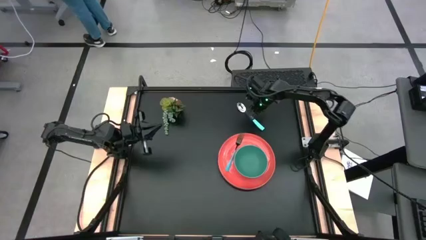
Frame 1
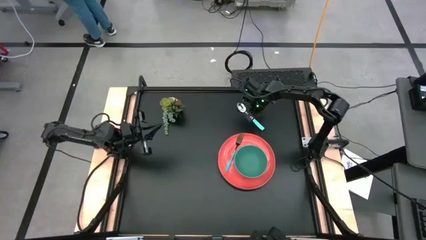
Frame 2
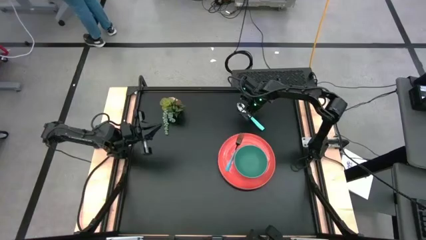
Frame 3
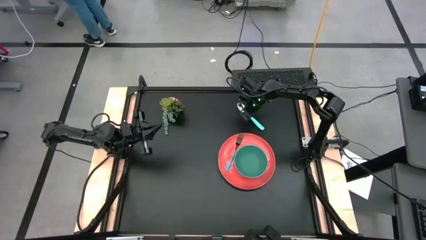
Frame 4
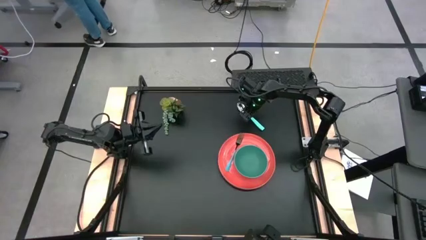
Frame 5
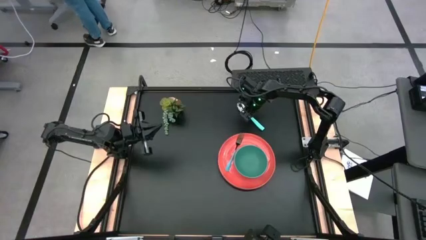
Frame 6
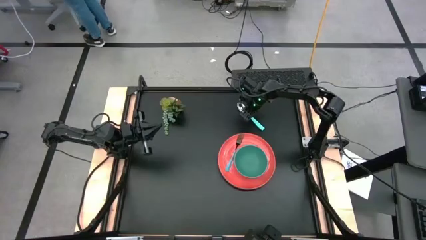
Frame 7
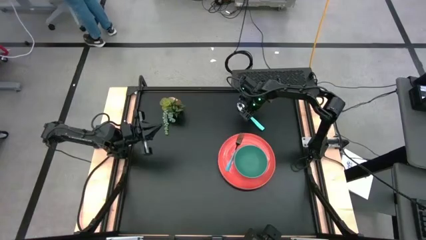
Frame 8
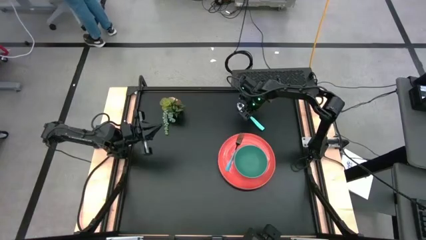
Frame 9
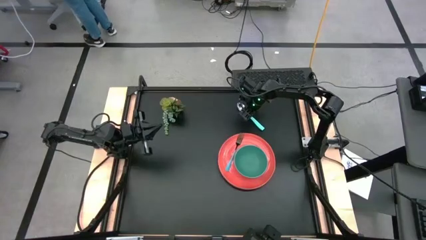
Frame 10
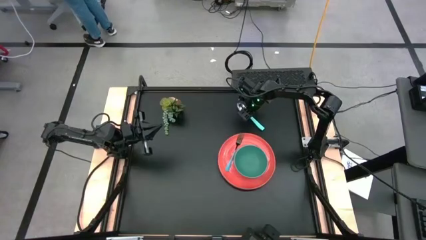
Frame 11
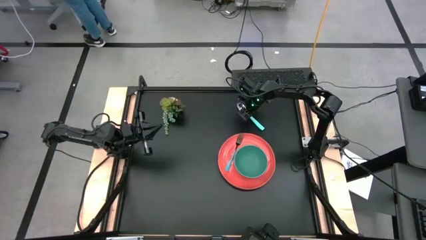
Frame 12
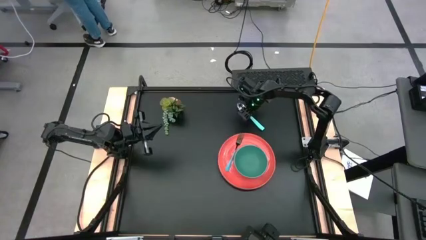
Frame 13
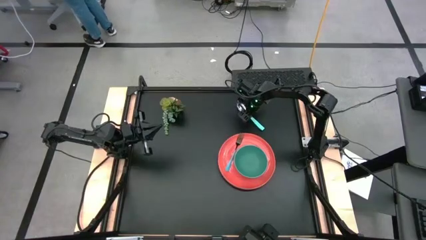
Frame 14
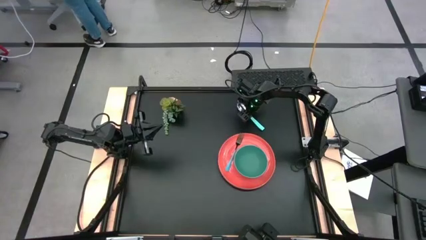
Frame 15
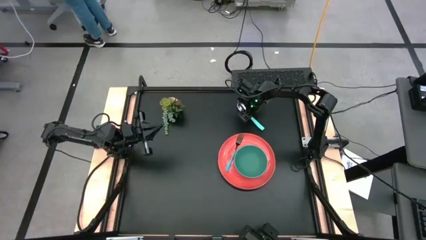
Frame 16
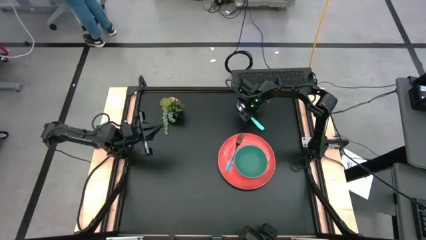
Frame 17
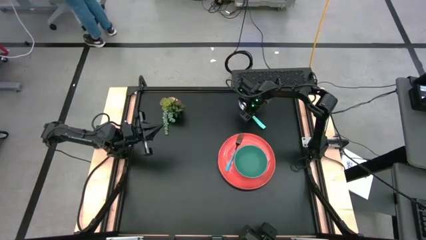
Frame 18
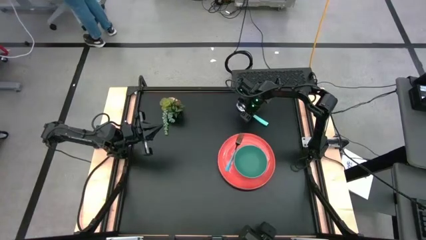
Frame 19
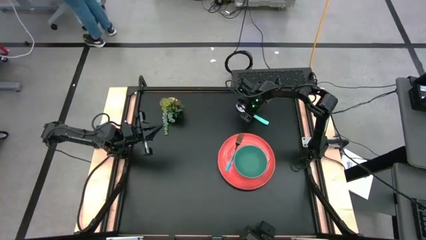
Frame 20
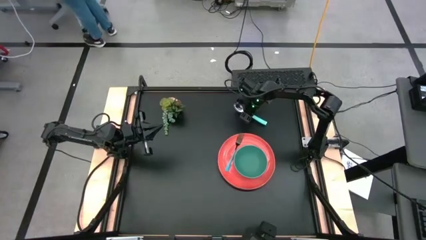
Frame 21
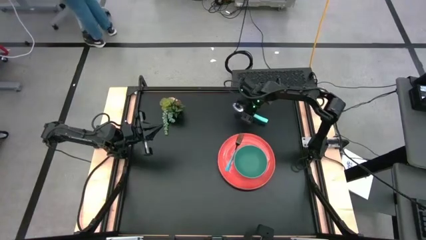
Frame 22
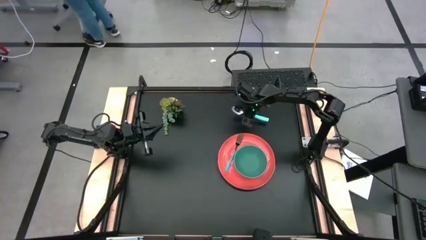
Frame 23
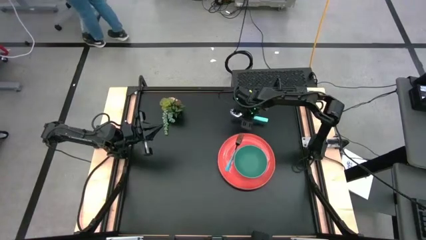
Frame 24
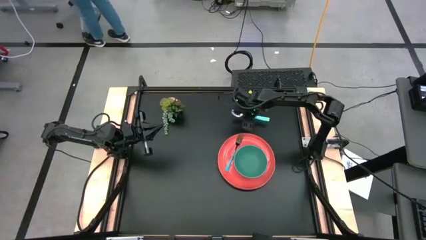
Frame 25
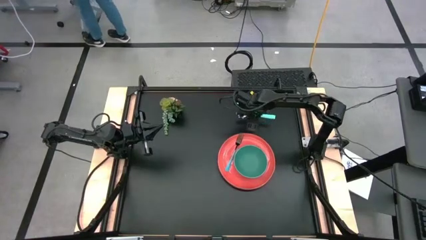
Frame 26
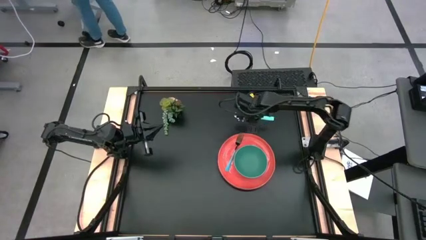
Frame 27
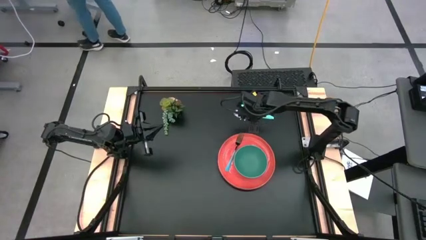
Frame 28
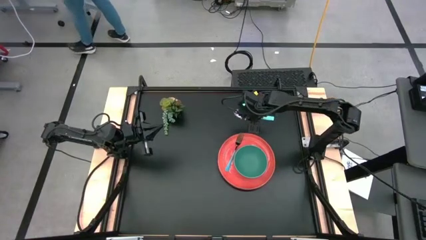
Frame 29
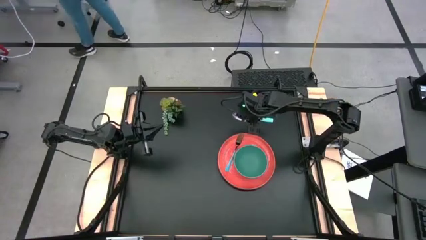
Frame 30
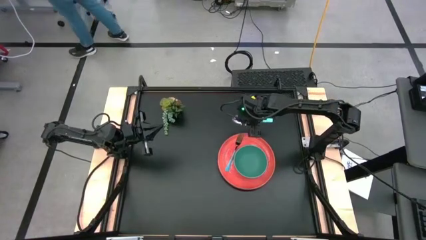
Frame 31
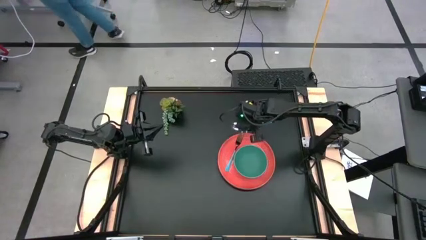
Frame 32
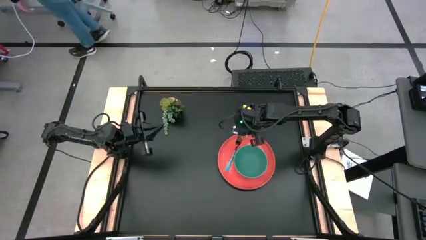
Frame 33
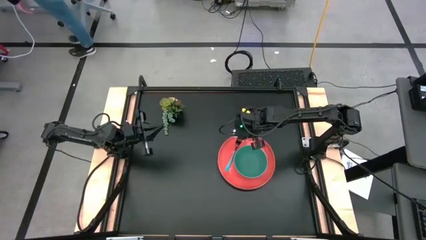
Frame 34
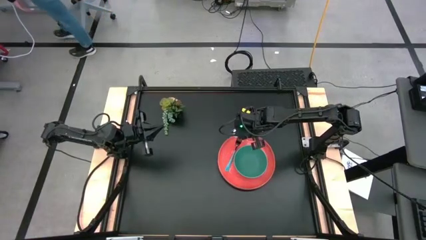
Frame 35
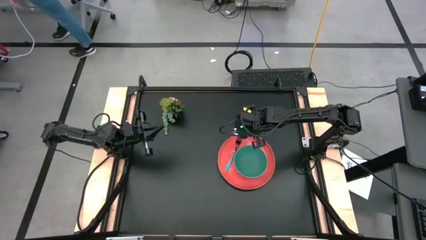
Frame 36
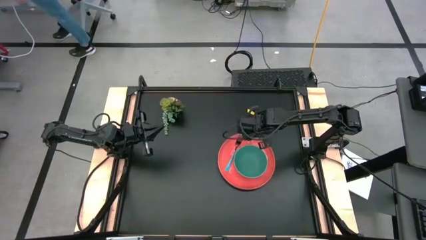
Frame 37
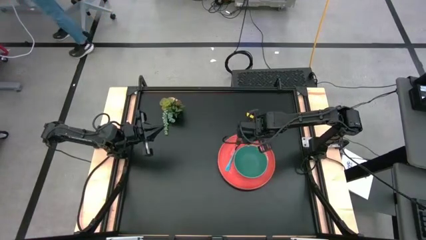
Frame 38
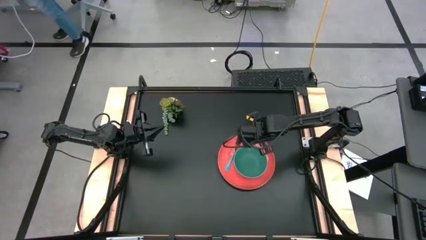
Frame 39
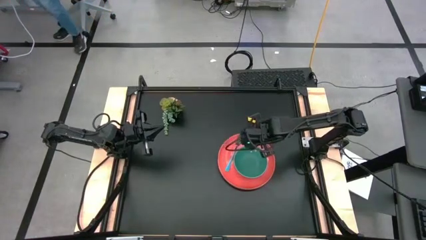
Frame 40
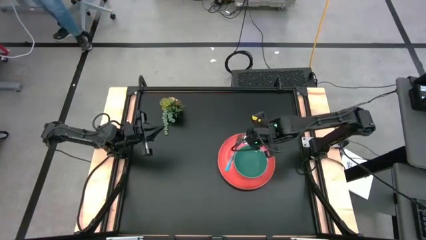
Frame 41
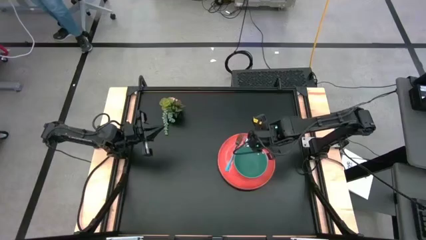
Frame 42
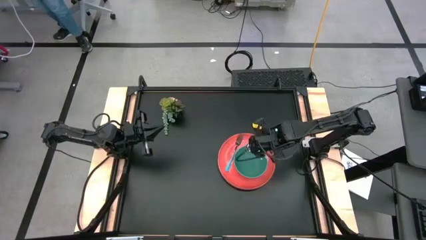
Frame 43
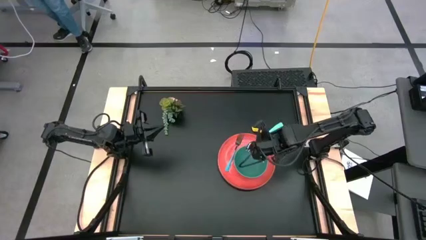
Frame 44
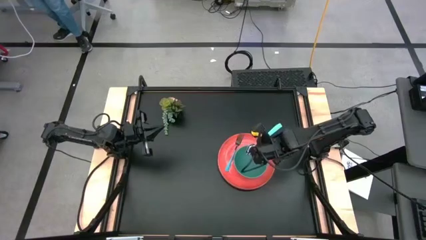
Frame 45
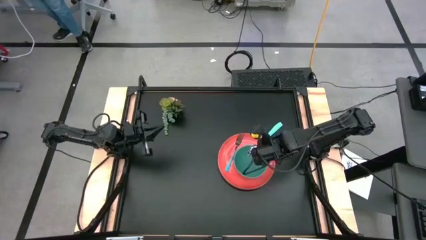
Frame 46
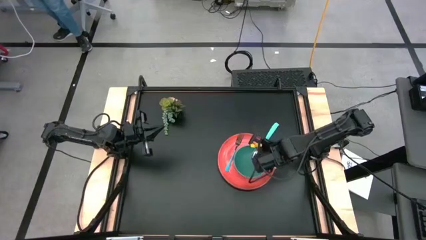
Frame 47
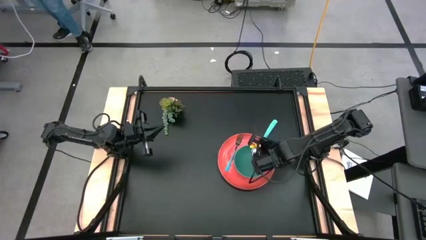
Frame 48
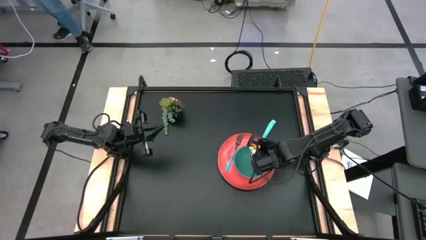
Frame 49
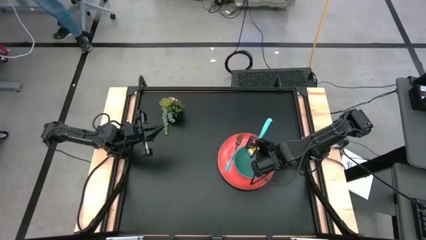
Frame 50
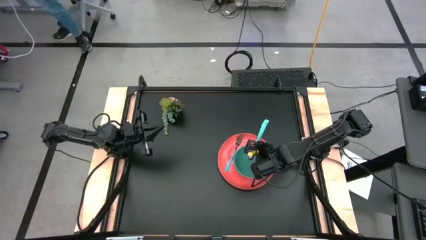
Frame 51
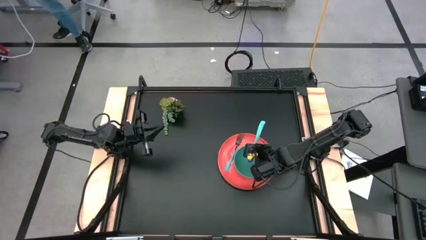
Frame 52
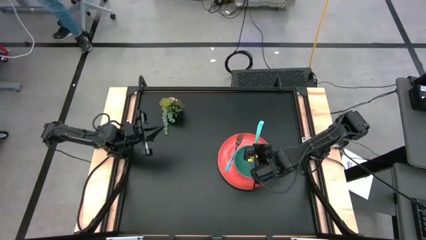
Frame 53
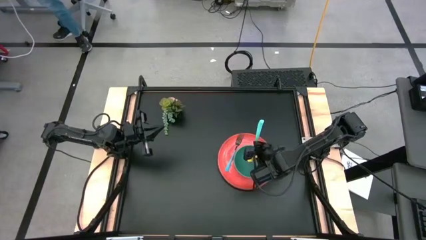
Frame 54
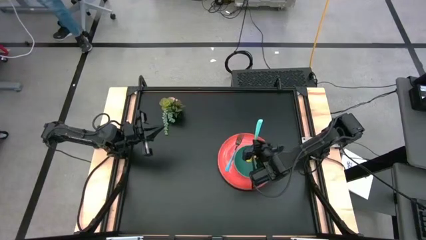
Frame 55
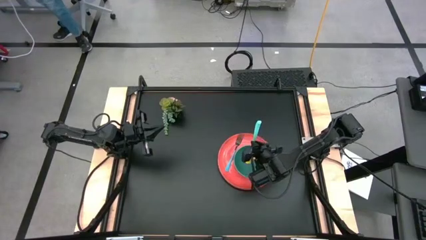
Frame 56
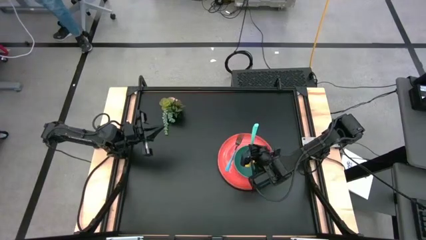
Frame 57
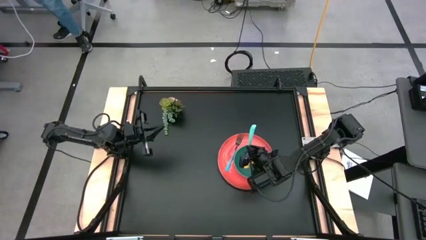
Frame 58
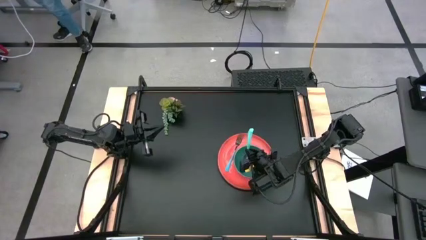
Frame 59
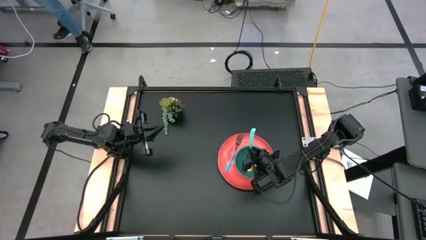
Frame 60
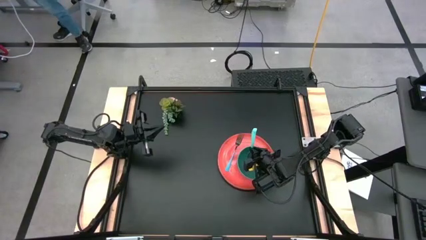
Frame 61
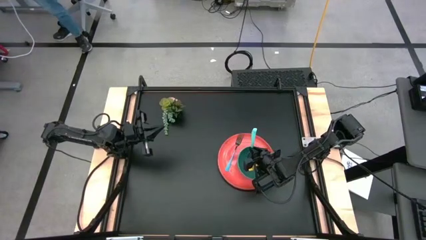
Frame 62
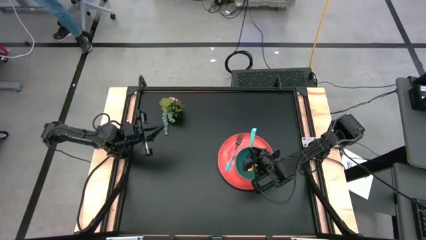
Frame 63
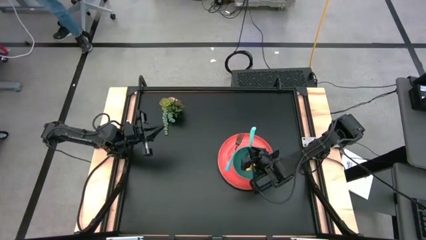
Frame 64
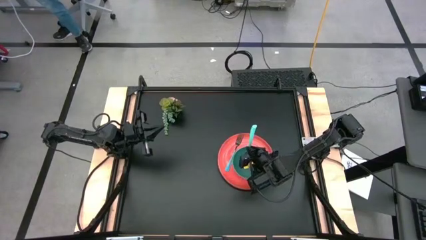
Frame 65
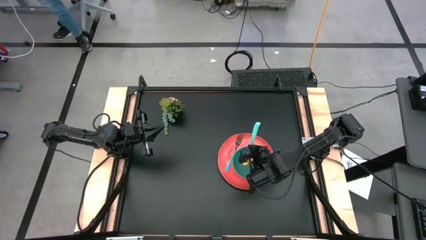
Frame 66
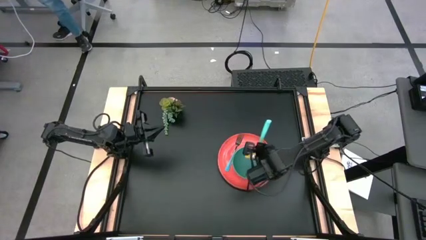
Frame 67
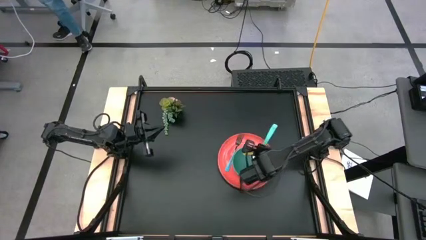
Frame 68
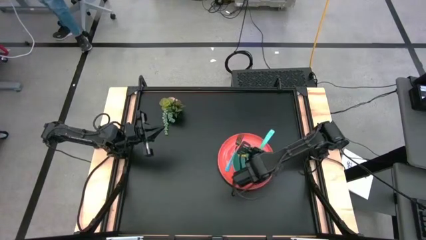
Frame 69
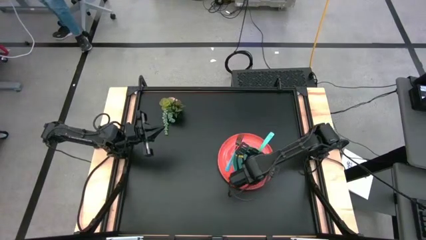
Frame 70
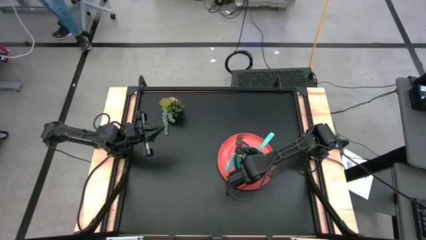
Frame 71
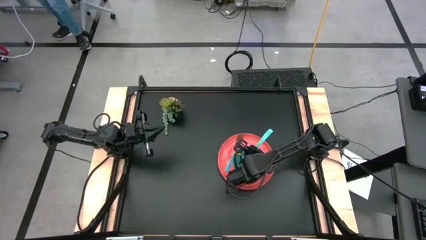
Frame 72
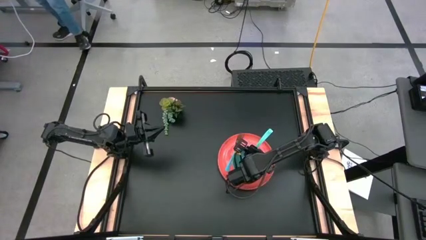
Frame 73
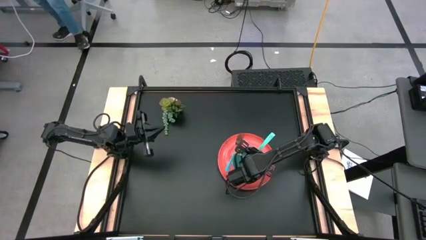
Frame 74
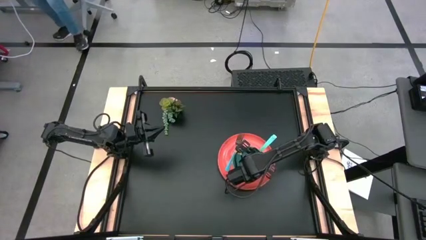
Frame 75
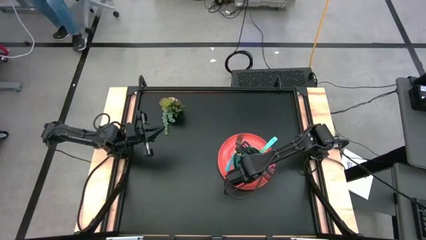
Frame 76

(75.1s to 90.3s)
Task: Set table place
Put the blue spoon into the green bowl
